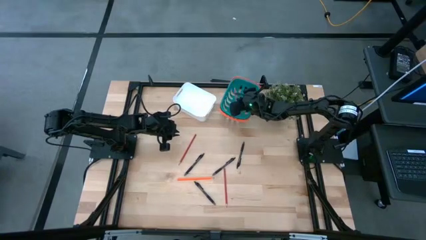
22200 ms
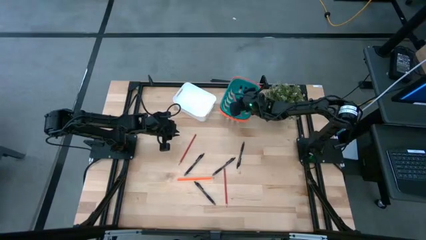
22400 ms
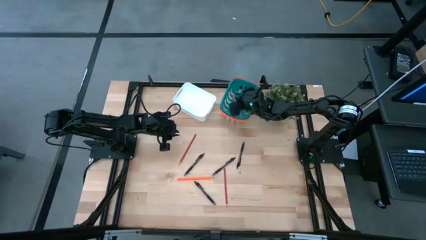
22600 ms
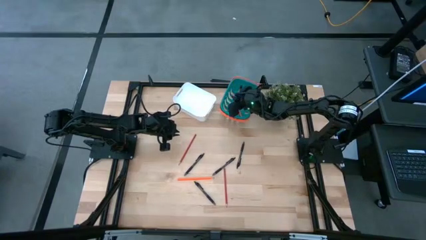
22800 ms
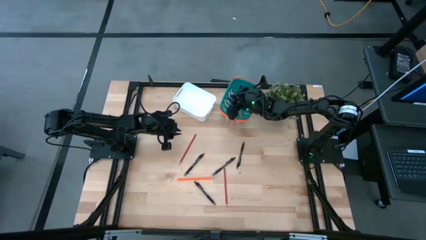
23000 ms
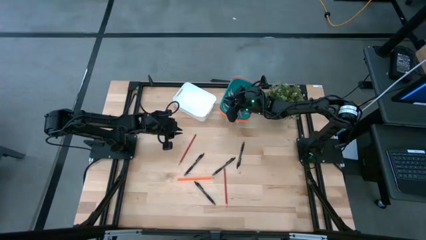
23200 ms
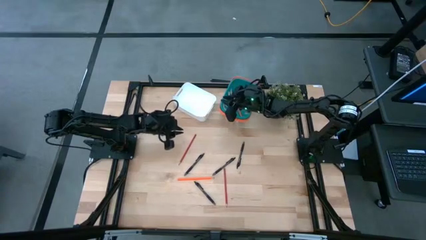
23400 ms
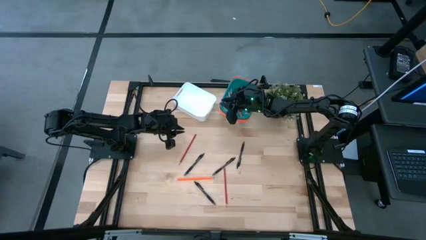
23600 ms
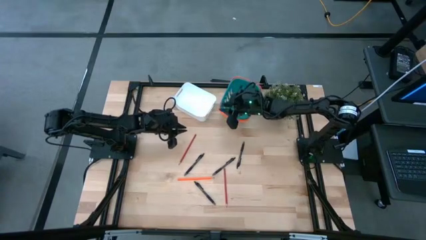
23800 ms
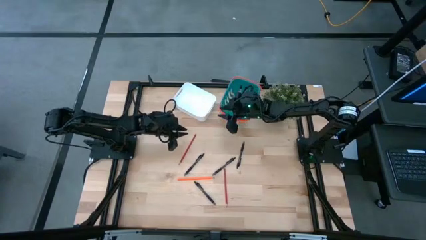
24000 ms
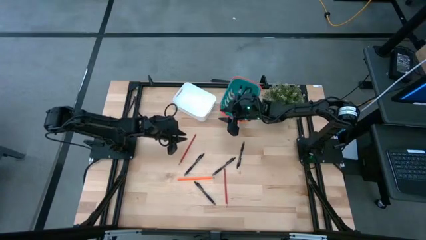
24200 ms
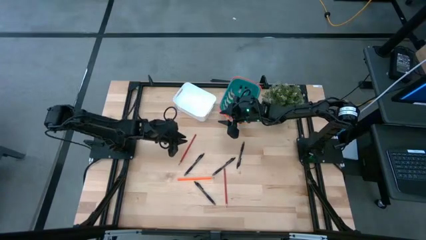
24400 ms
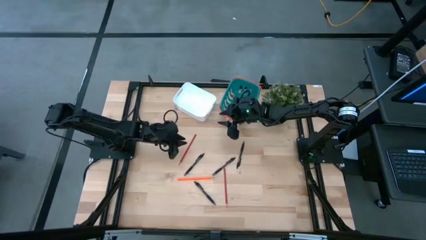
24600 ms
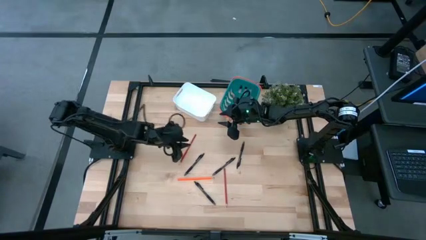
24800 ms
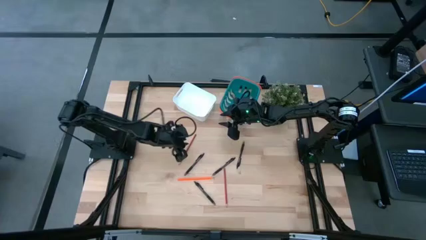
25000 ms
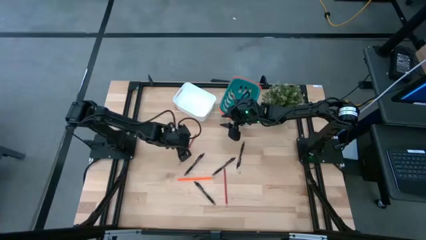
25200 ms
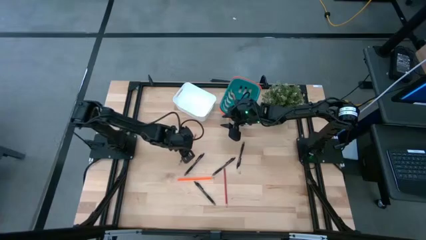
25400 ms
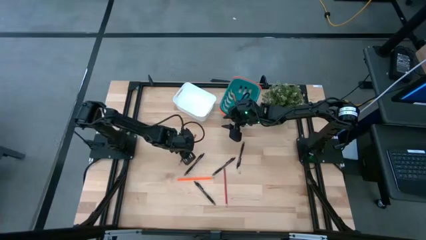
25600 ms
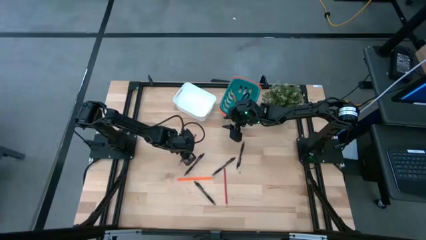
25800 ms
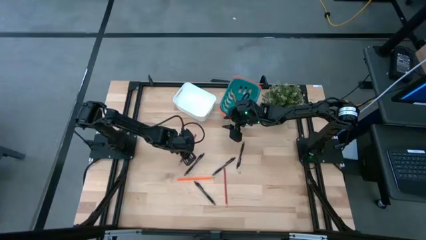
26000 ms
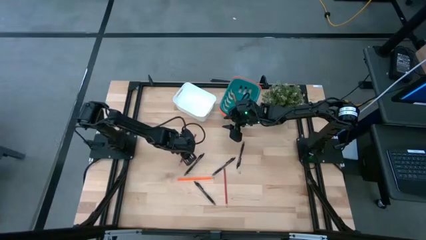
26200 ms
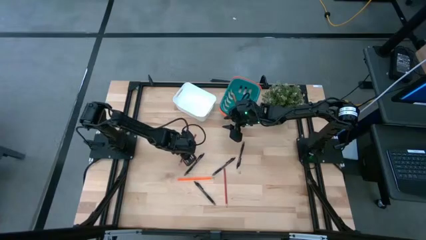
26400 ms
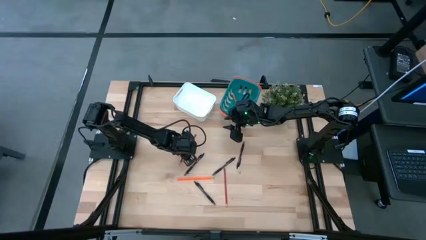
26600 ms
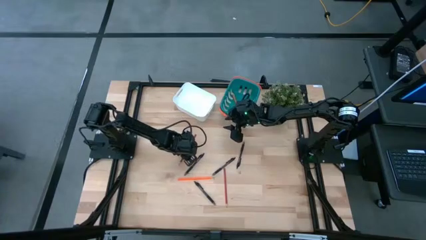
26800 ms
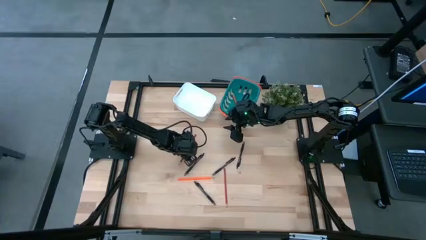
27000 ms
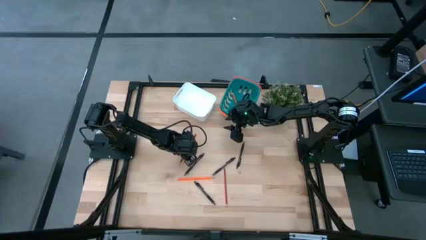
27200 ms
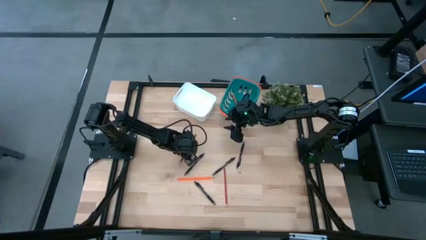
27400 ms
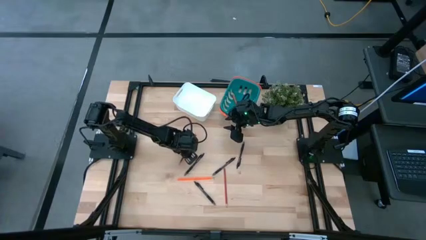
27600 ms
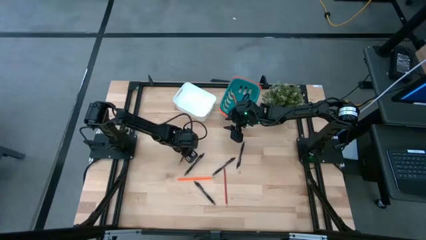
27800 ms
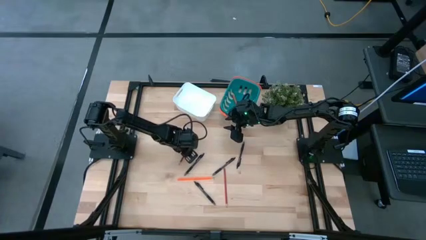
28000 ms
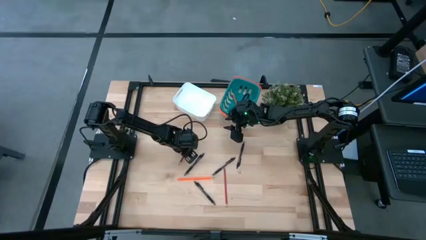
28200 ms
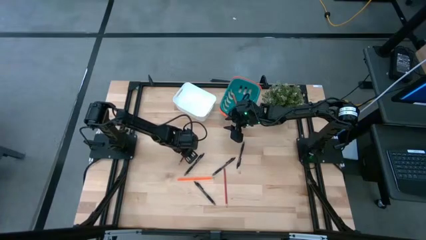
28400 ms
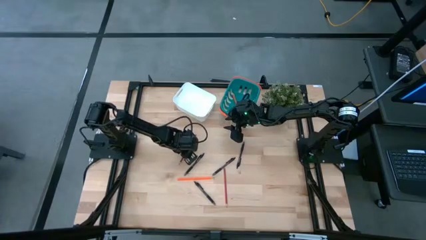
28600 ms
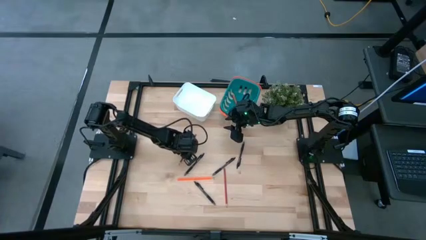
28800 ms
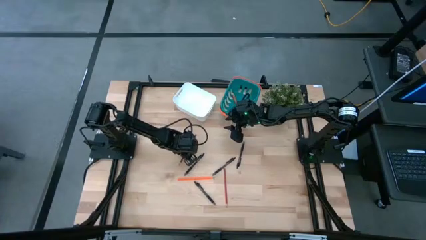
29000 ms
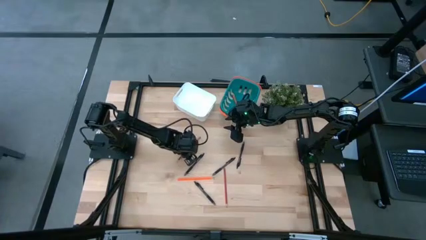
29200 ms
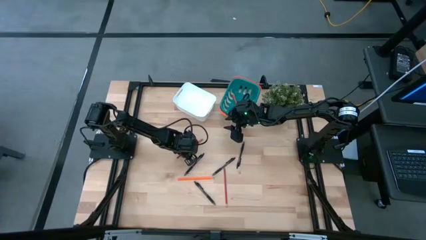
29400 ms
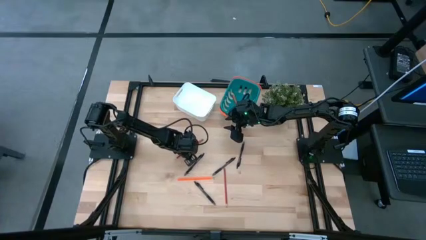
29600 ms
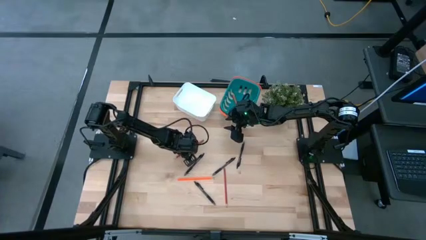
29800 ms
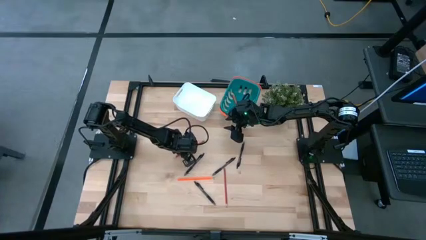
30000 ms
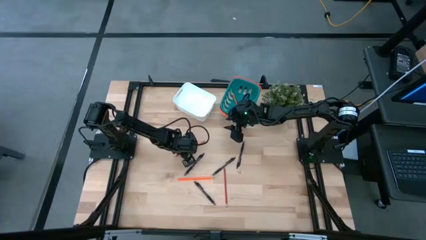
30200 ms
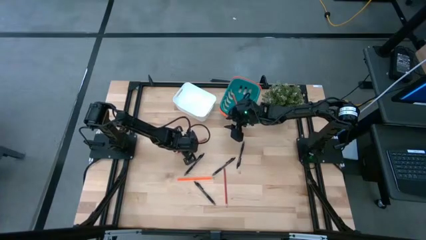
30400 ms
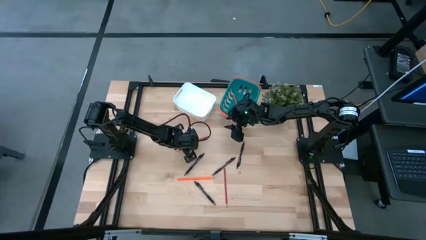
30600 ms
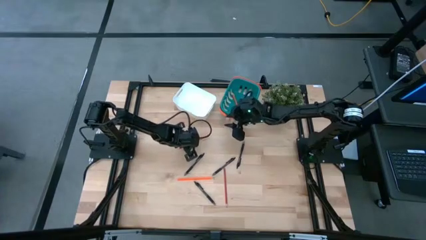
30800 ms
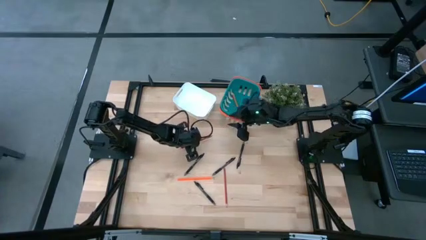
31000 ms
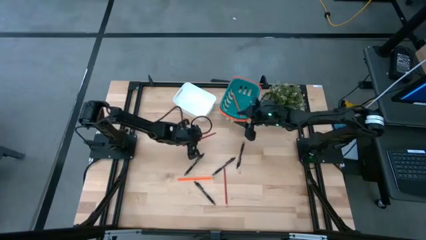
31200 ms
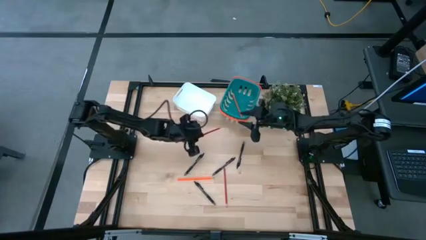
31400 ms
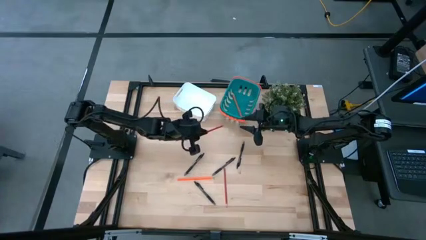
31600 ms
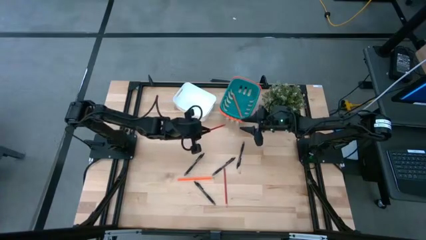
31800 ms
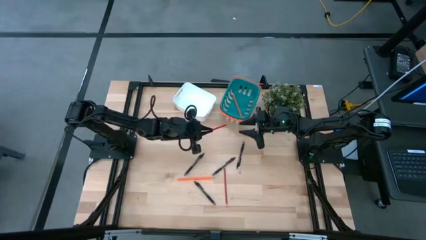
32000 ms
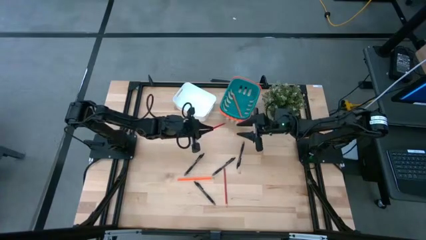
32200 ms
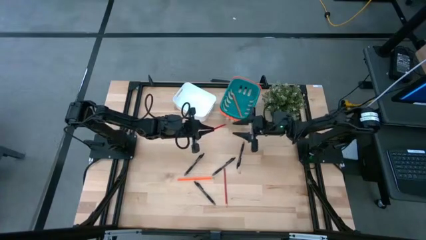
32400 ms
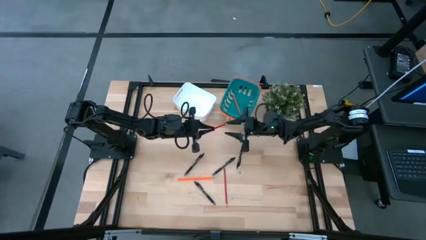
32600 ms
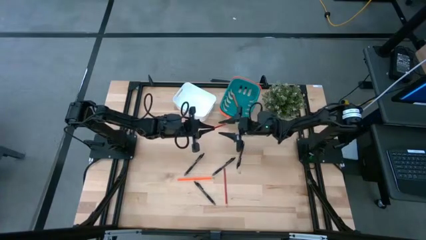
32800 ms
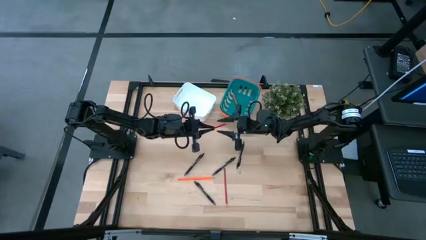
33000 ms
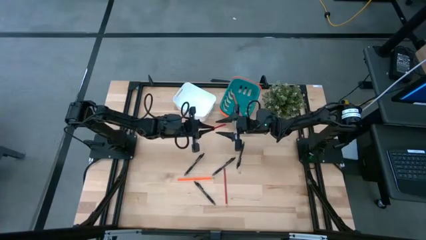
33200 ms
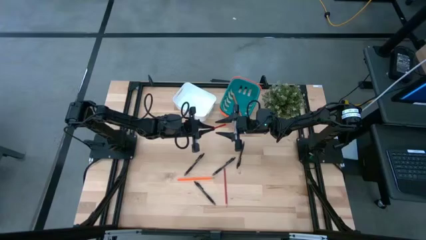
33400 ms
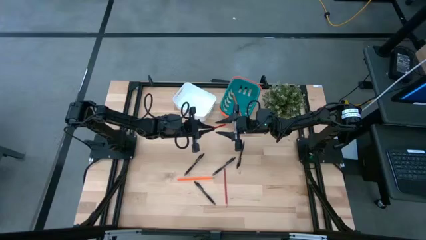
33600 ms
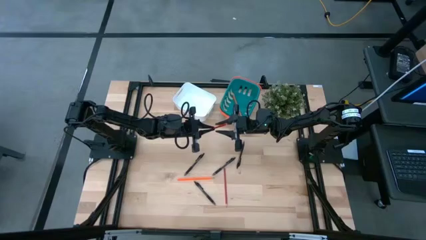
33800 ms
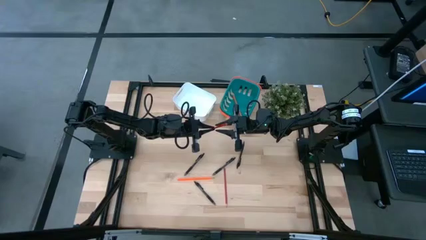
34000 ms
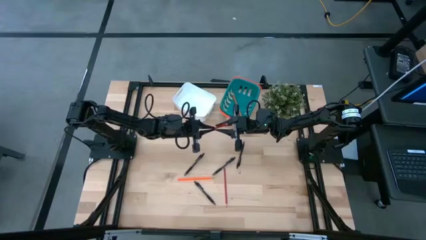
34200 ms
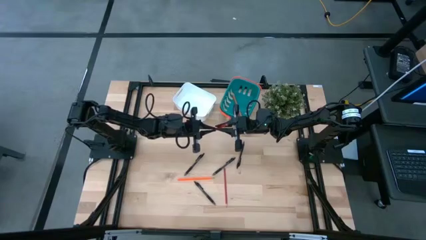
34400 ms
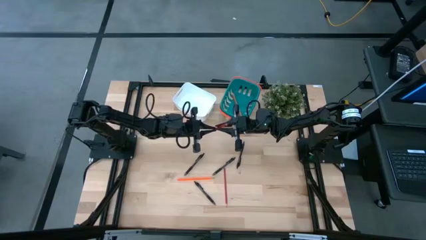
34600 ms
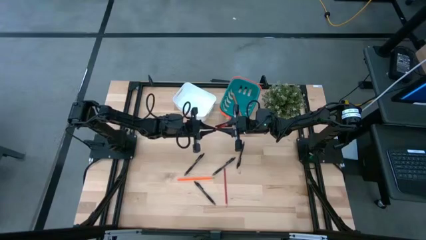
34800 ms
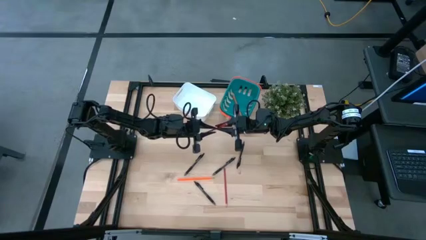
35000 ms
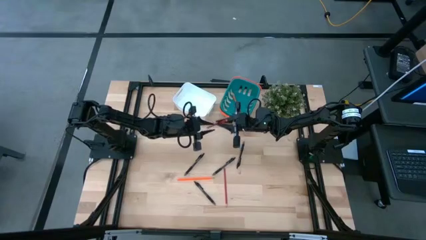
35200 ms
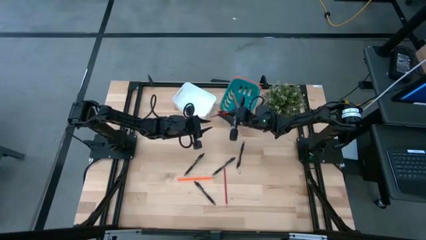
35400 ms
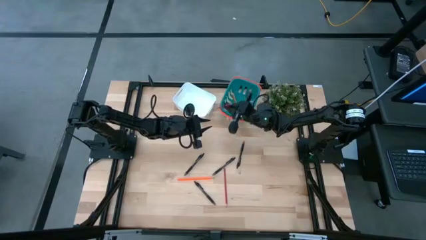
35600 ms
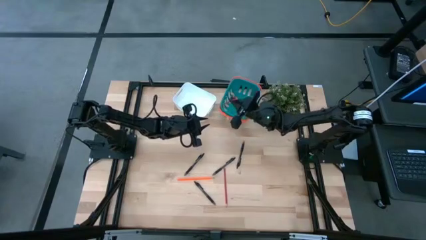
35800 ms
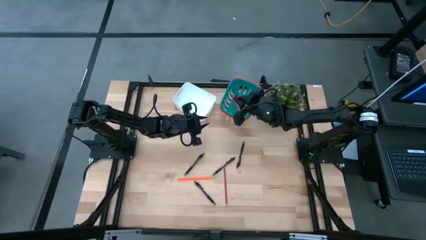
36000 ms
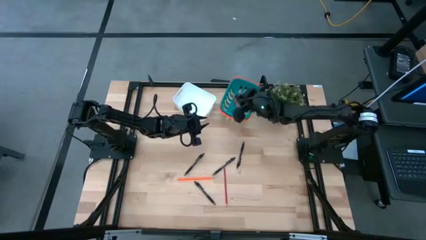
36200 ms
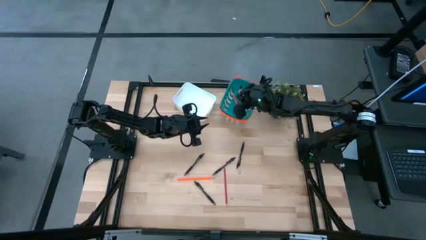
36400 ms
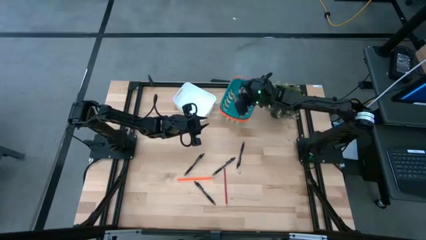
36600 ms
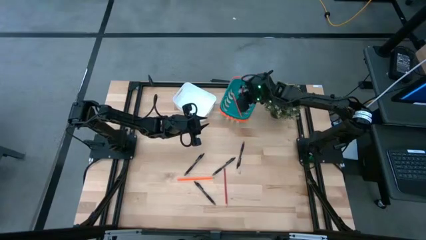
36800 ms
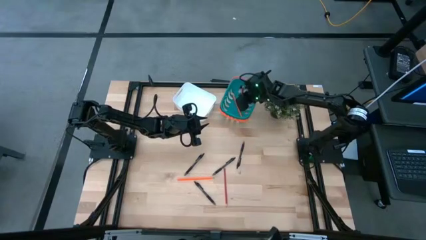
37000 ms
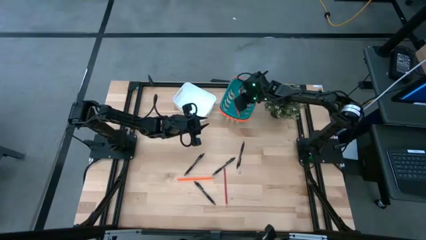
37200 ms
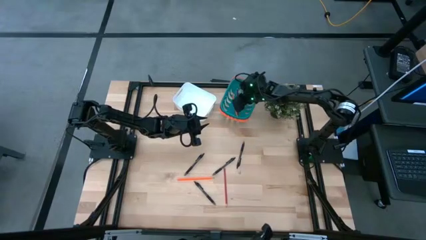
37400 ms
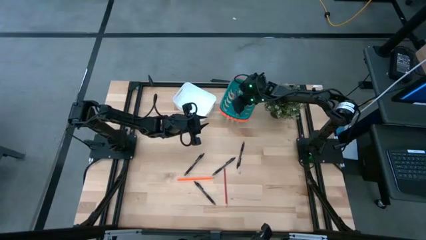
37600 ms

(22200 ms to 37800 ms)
Task: Sort pens & pencils
Put the red pencil into the green basket
